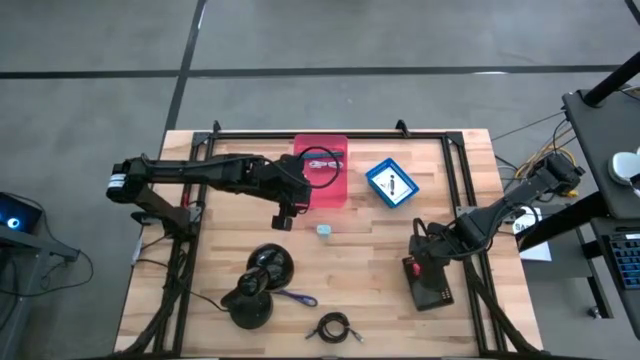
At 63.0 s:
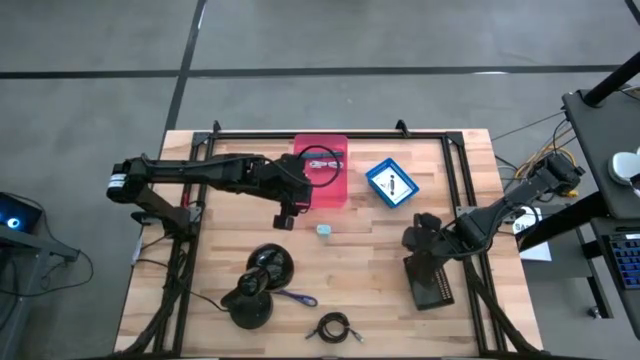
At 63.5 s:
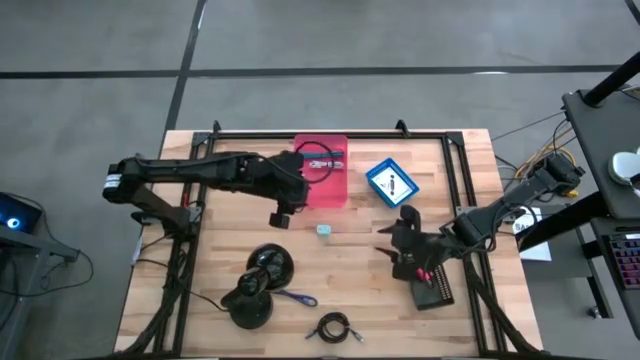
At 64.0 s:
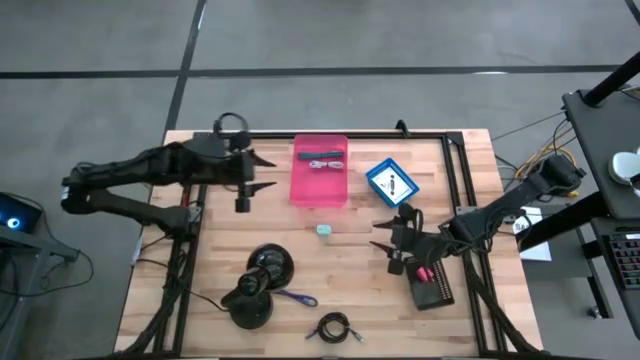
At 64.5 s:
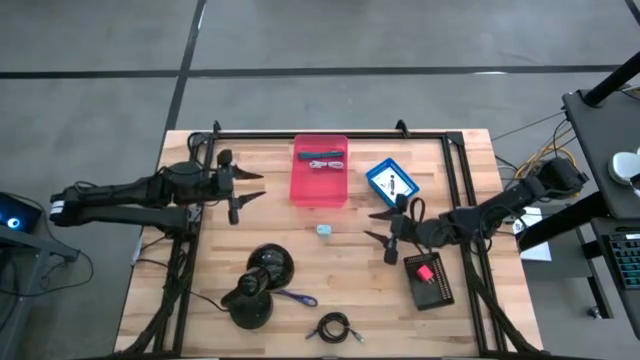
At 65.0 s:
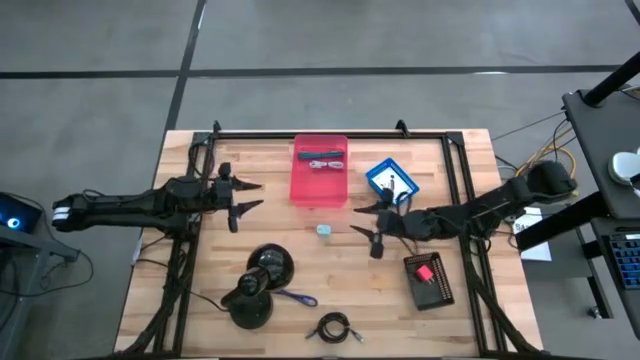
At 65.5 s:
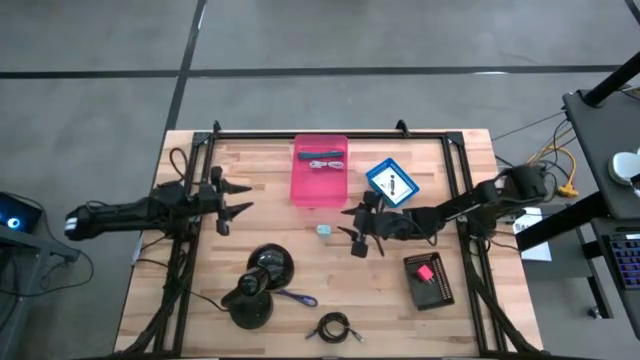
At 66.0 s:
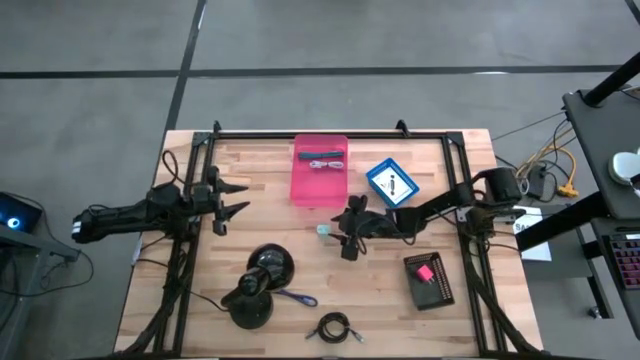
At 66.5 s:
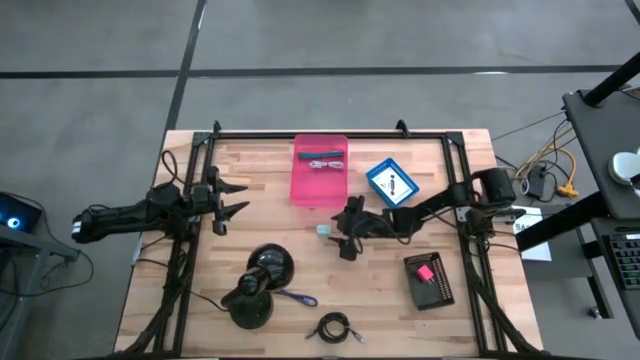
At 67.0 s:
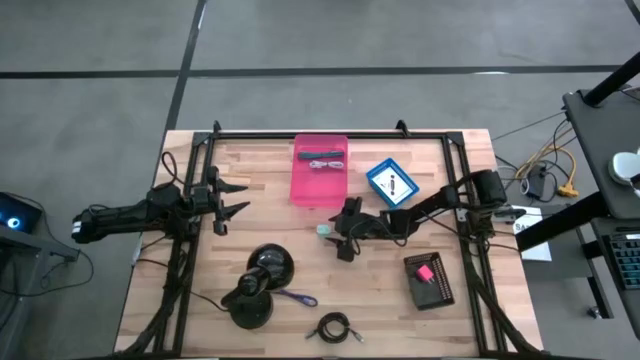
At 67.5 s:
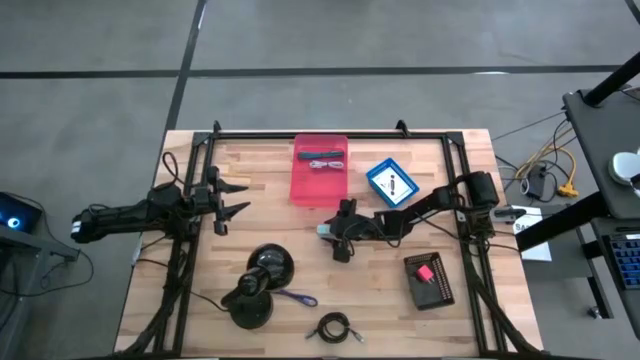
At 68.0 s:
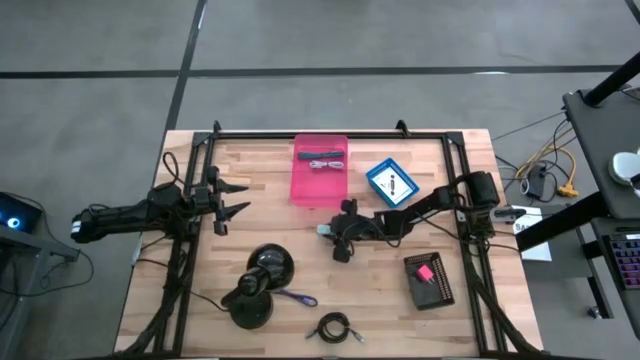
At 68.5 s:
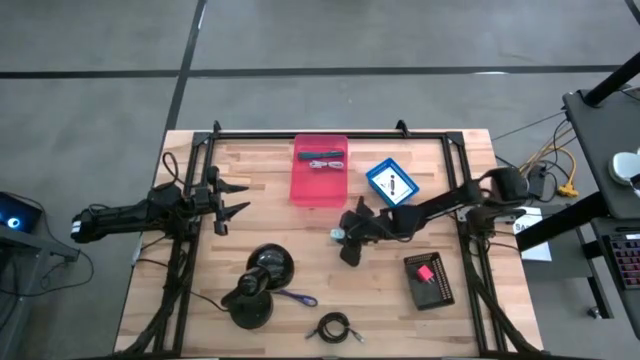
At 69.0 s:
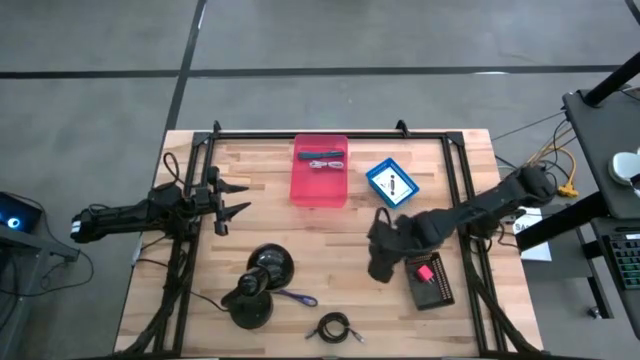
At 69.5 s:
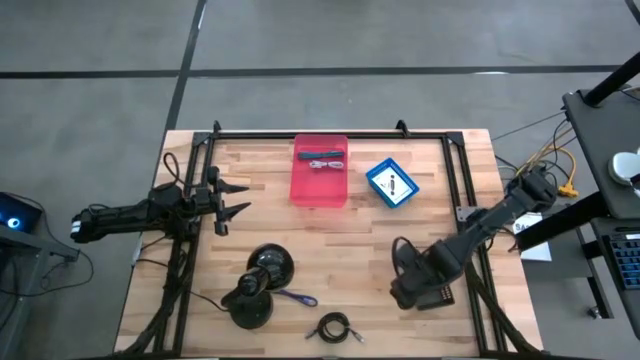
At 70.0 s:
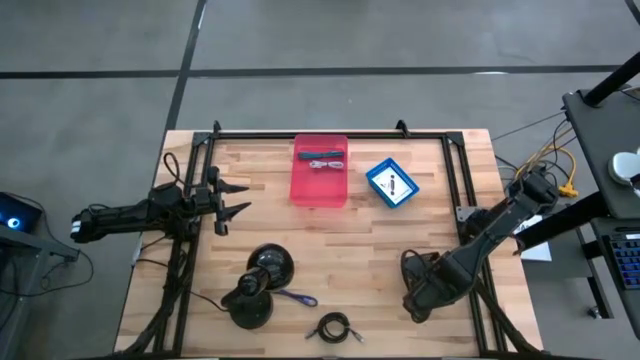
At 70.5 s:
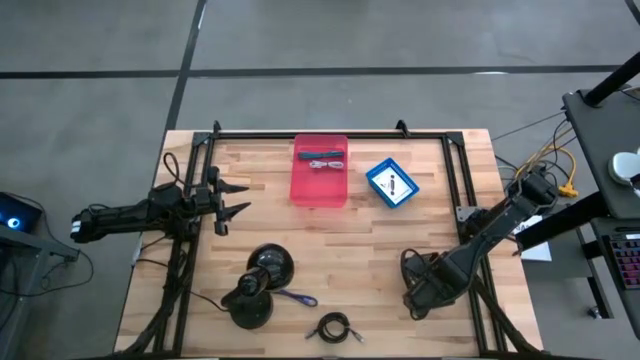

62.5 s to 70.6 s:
Task: Pick and place items into bin
Put the white charger adapter into the black bin

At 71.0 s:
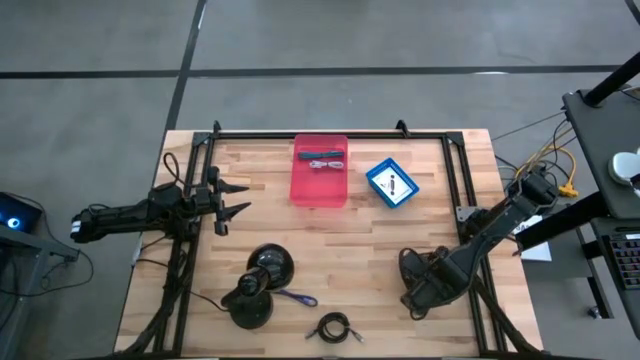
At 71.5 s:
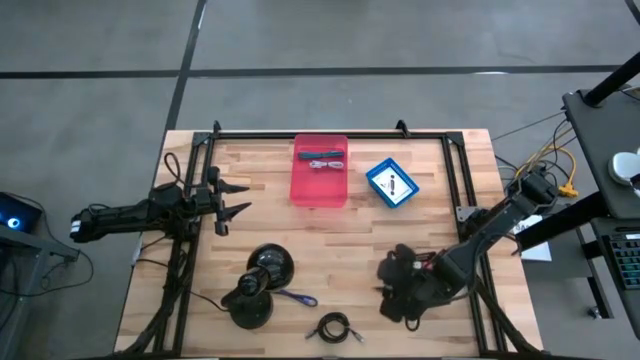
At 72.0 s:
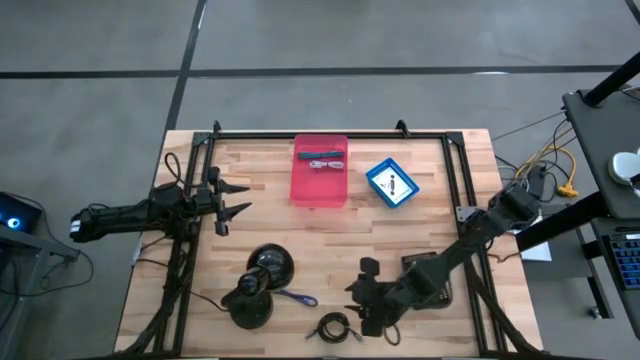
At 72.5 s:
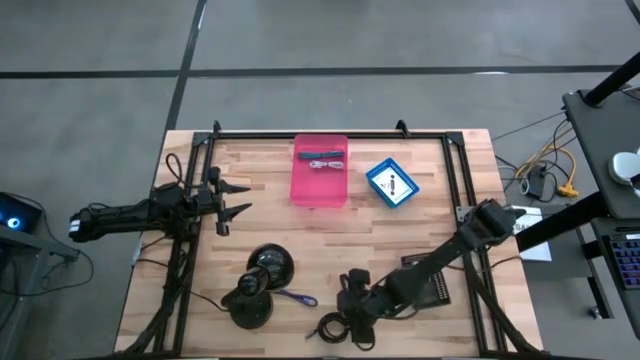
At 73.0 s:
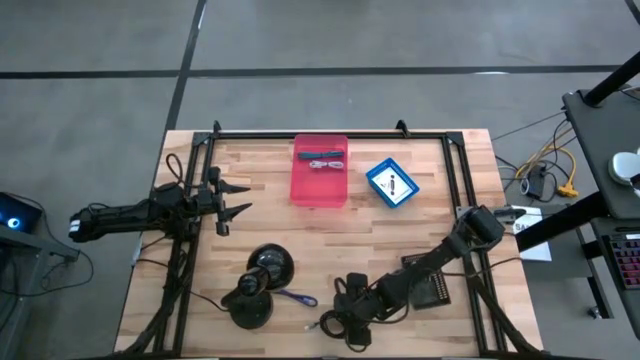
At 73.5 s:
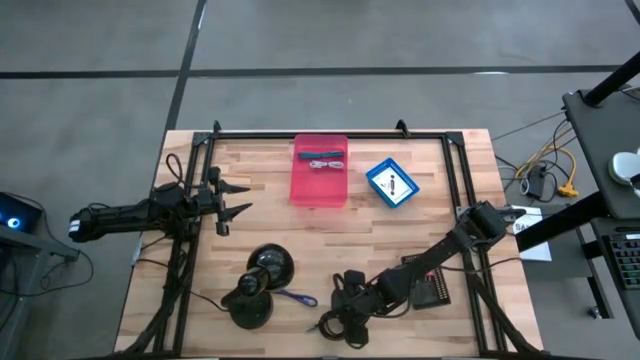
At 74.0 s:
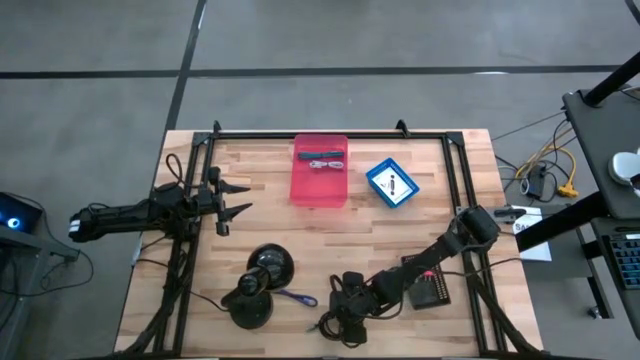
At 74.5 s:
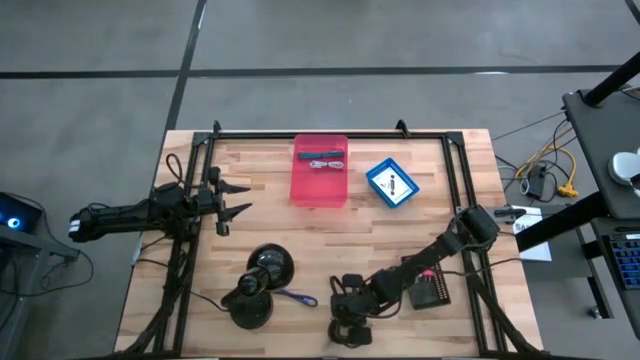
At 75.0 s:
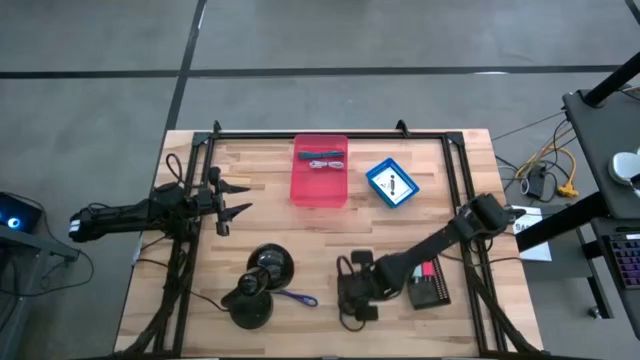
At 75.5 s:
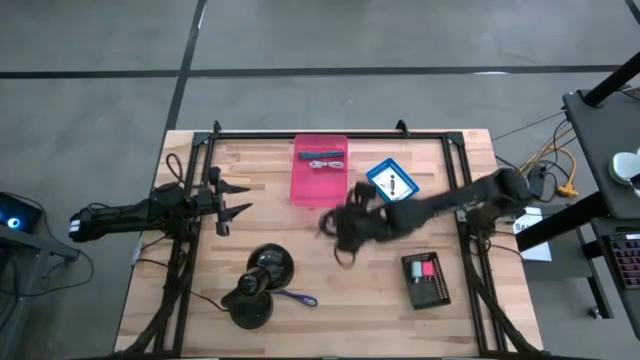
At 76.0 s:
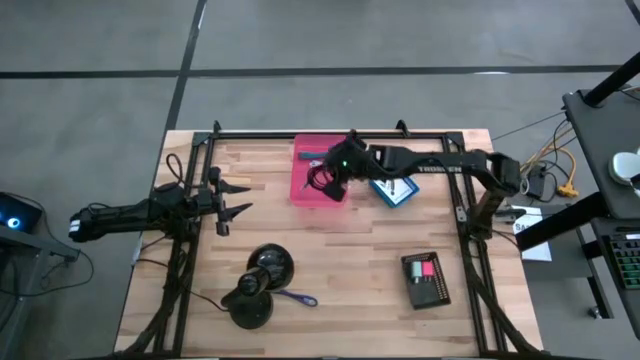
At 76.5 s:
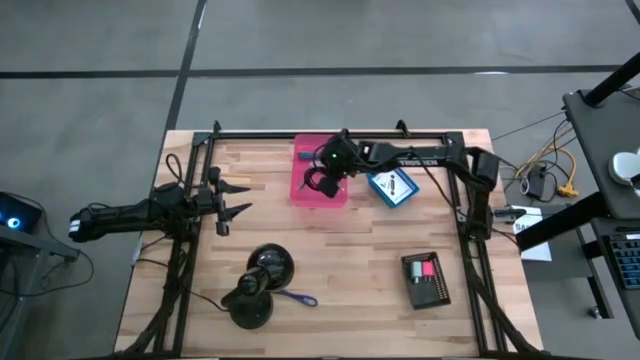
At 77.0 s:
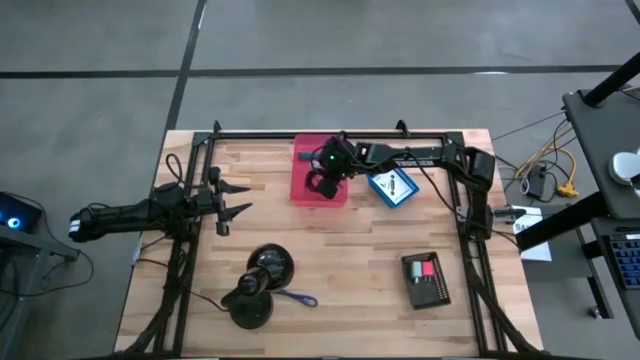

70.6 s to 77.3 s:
Put the black charger cable into the pink bin

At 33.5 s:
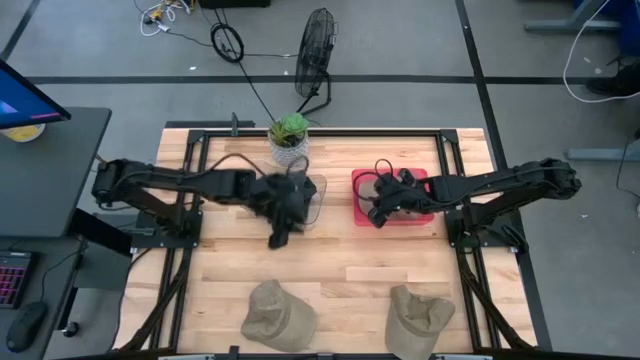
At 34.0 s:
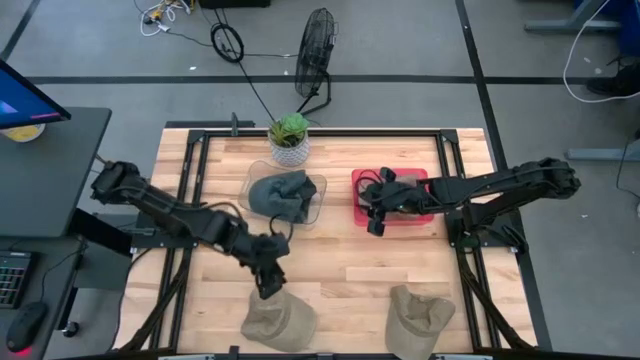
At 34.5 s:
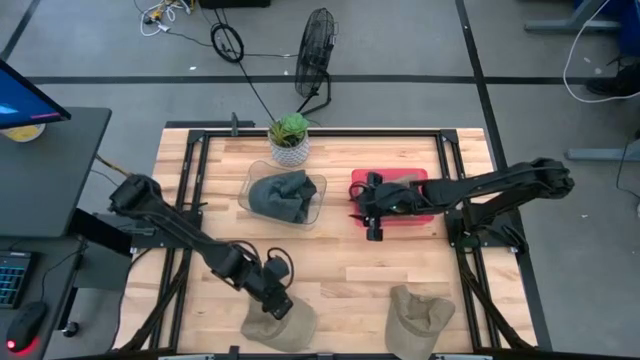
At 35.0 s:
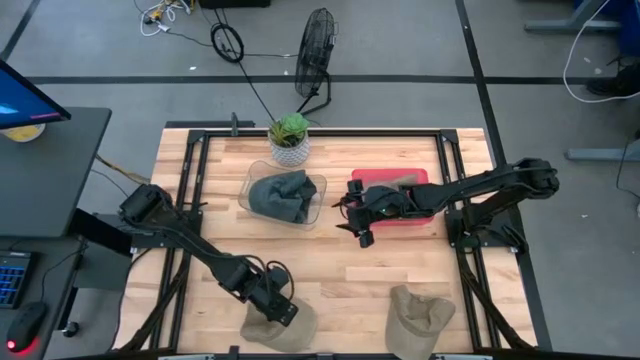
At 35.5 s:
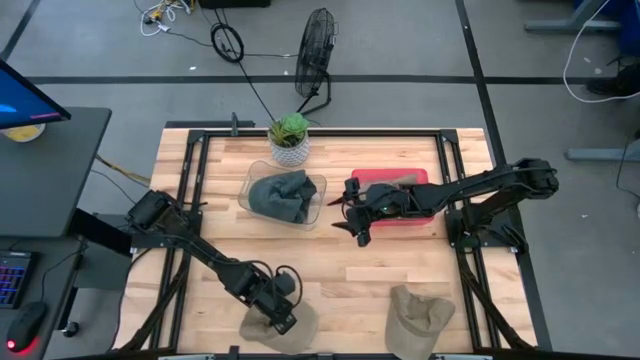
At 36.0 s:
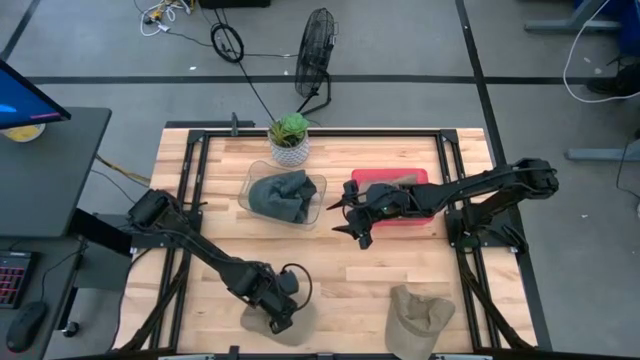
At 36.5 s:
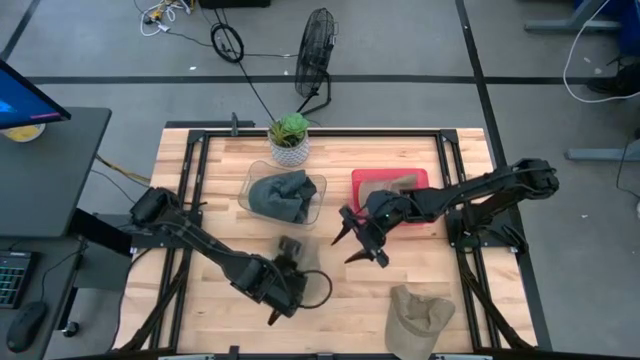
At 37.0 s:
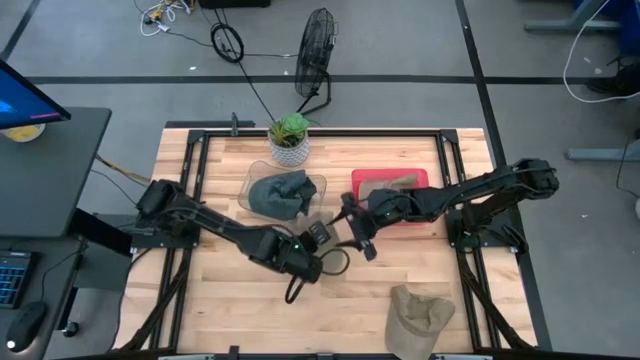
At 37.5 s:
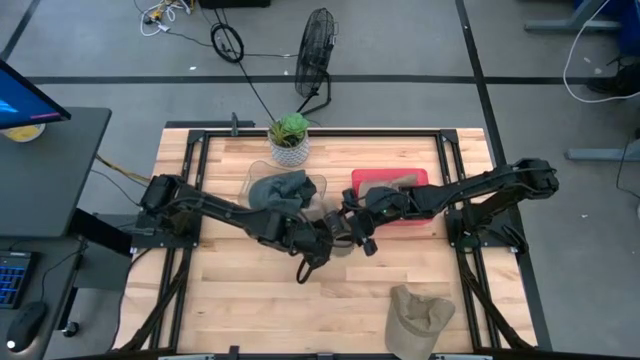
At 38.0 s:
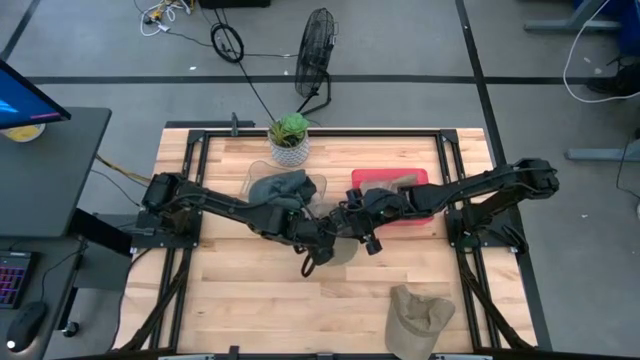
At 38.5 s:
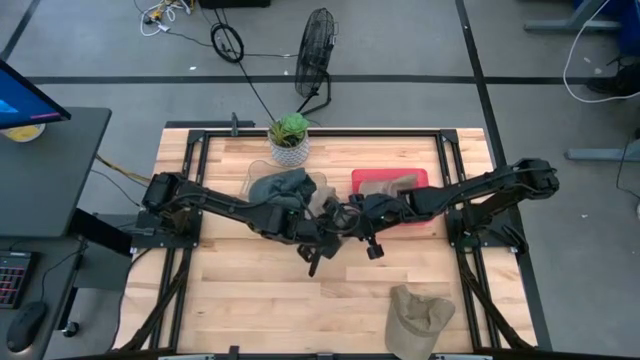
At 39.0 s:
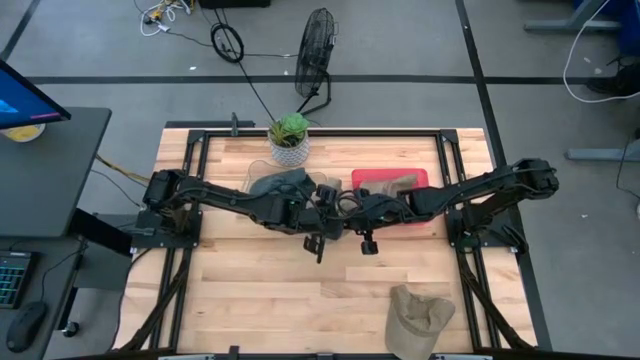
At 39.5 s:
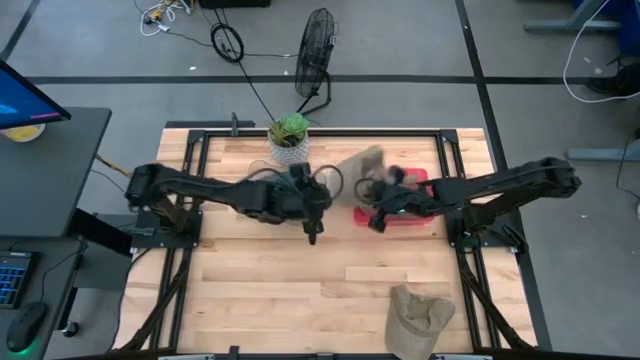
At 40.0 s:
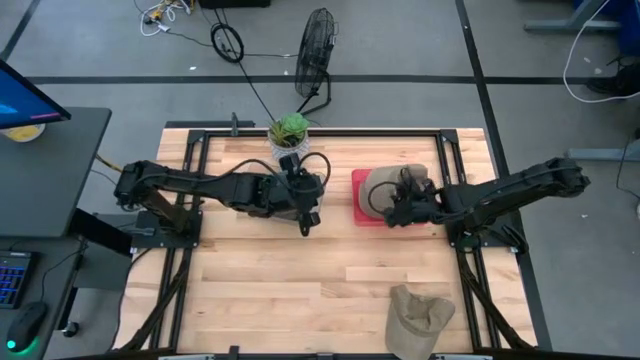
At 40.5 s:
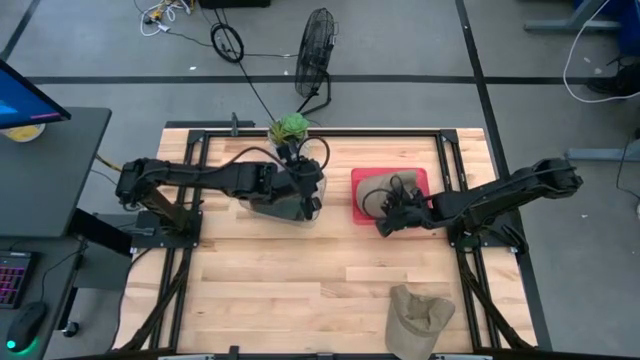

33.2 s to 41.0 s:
Task: Pick & Place hat
Put the left brown cap into the red bin
